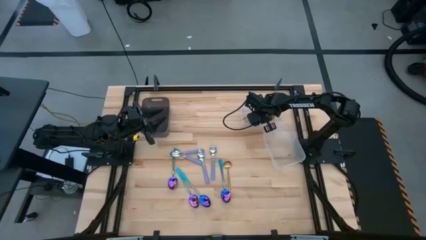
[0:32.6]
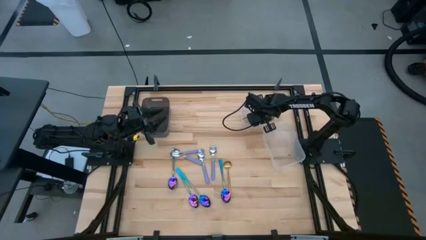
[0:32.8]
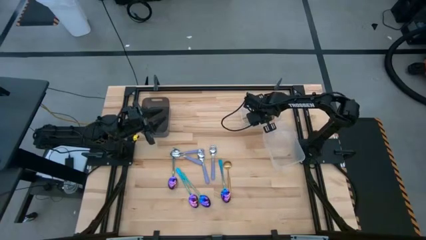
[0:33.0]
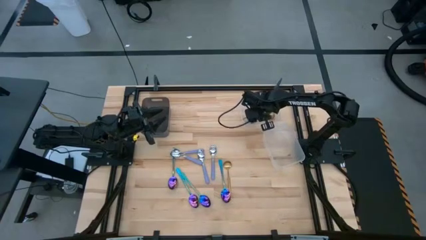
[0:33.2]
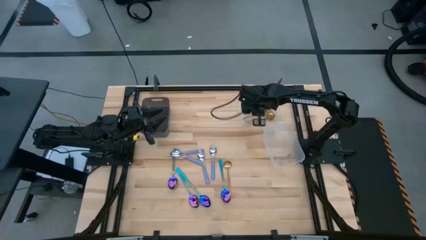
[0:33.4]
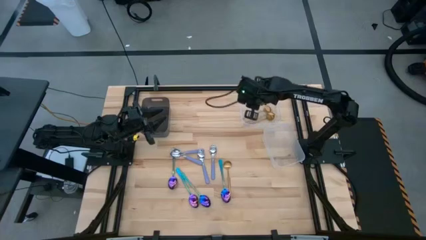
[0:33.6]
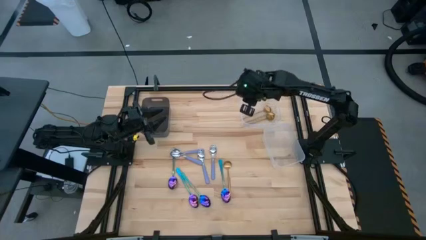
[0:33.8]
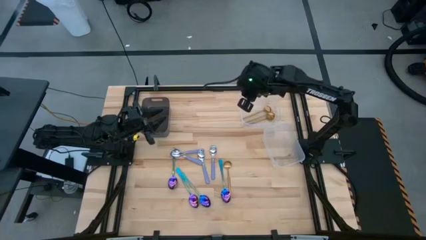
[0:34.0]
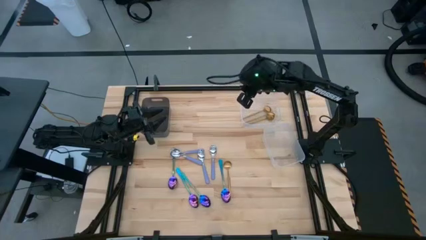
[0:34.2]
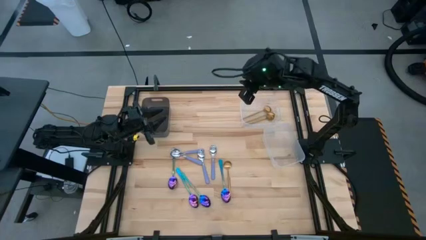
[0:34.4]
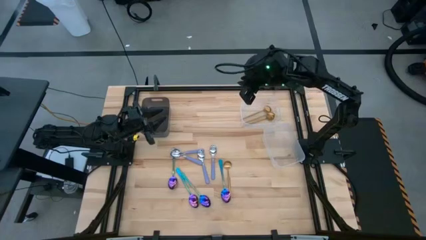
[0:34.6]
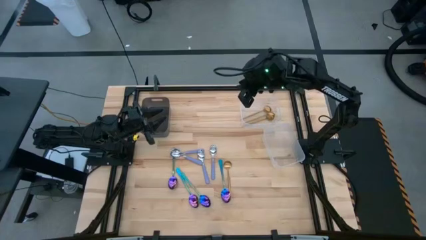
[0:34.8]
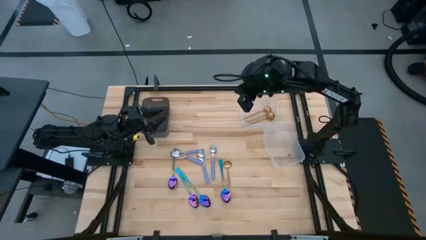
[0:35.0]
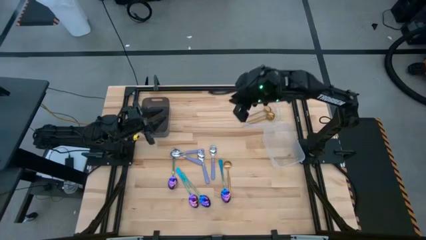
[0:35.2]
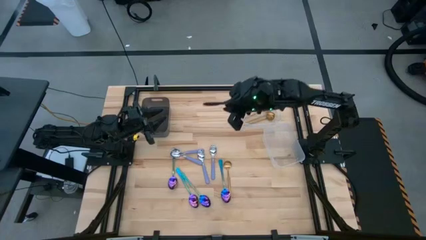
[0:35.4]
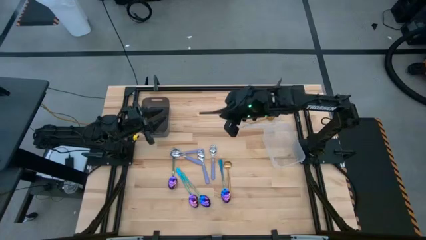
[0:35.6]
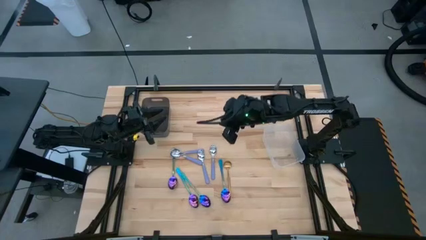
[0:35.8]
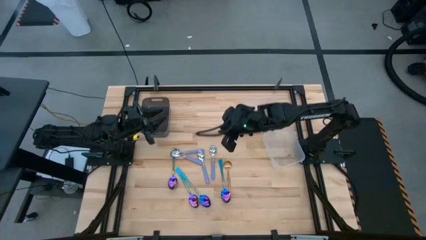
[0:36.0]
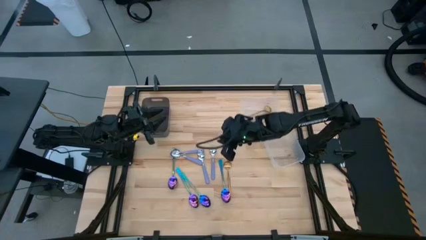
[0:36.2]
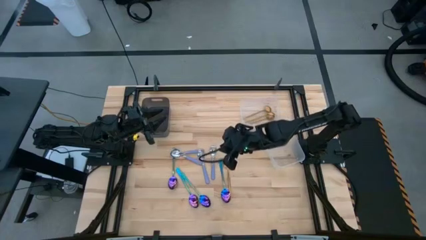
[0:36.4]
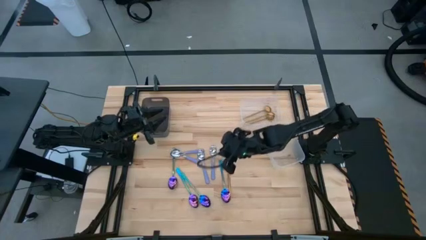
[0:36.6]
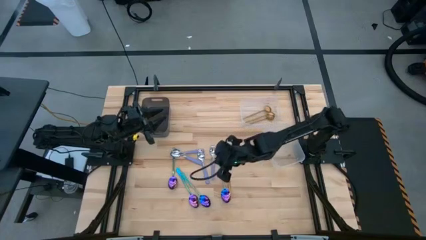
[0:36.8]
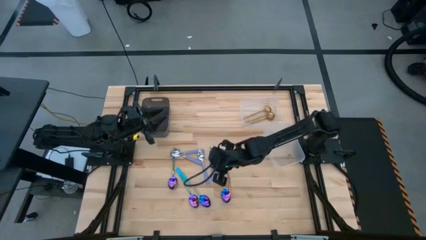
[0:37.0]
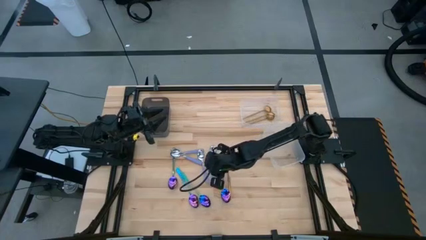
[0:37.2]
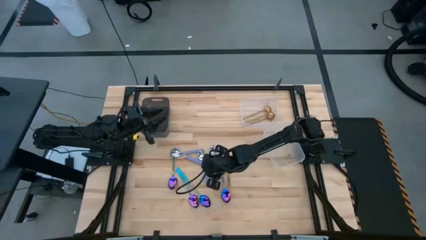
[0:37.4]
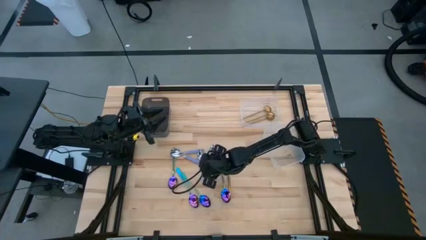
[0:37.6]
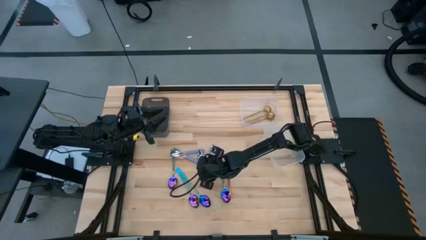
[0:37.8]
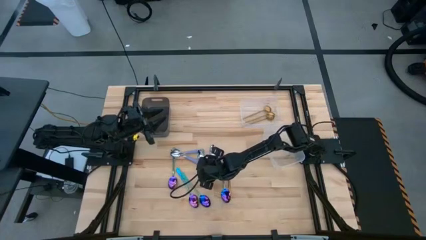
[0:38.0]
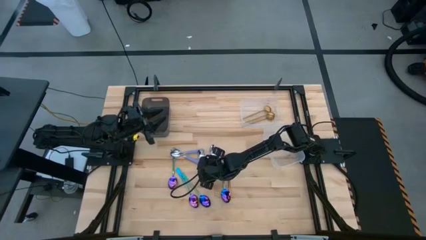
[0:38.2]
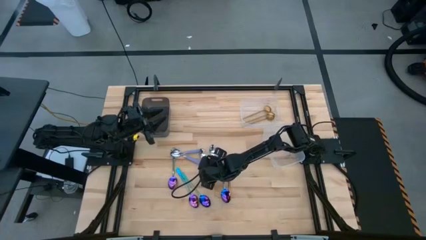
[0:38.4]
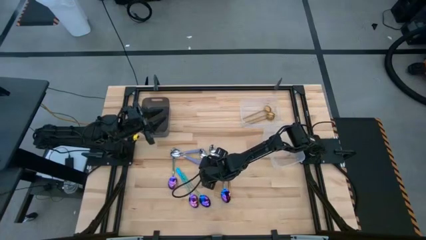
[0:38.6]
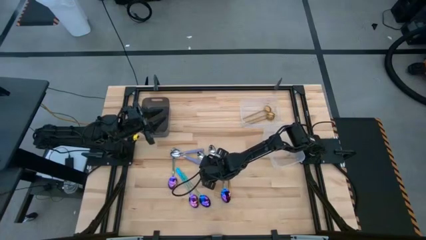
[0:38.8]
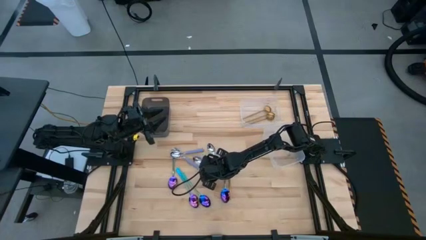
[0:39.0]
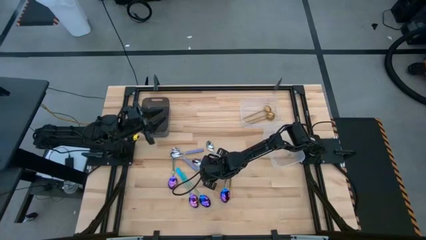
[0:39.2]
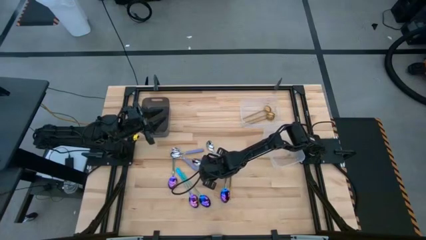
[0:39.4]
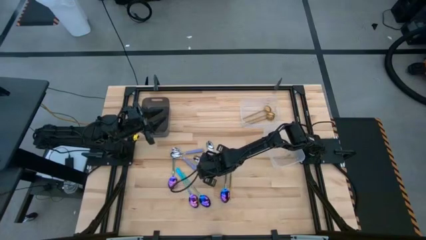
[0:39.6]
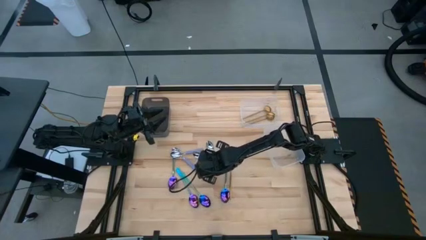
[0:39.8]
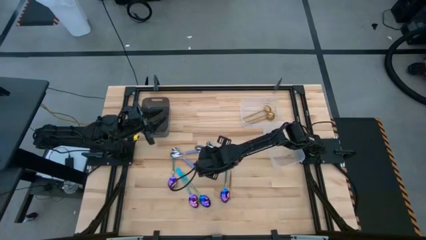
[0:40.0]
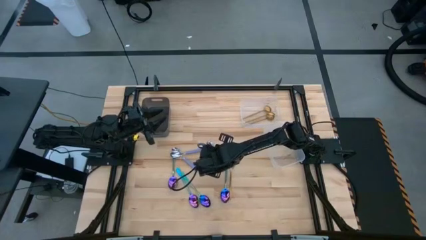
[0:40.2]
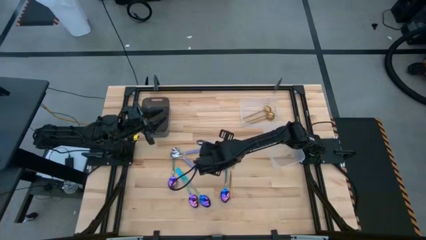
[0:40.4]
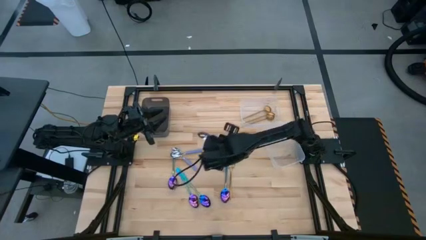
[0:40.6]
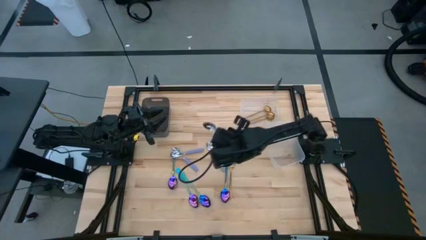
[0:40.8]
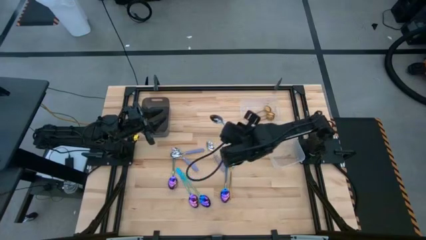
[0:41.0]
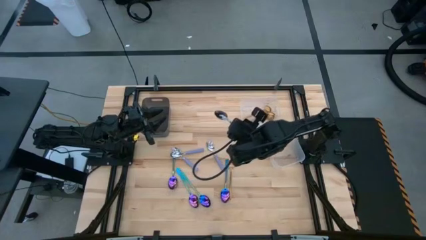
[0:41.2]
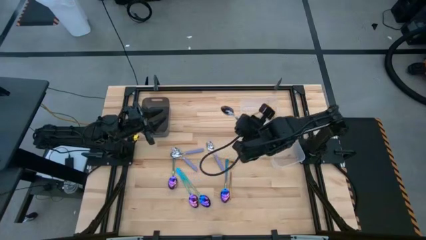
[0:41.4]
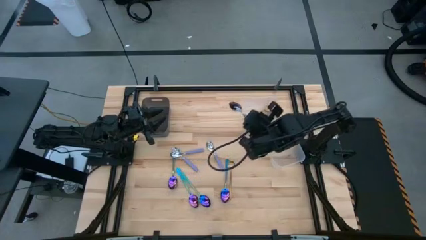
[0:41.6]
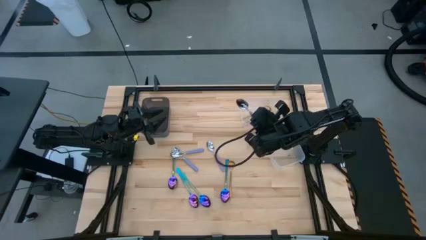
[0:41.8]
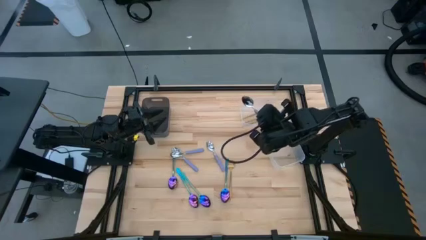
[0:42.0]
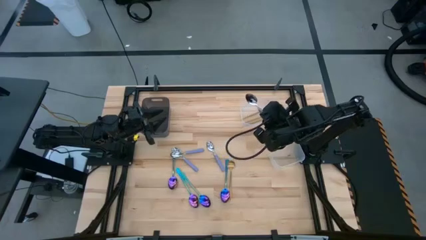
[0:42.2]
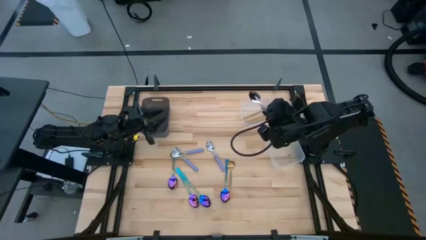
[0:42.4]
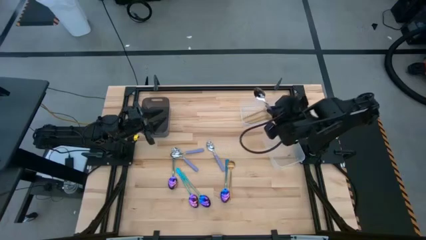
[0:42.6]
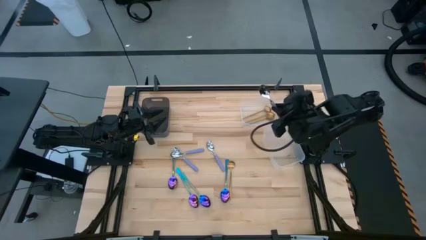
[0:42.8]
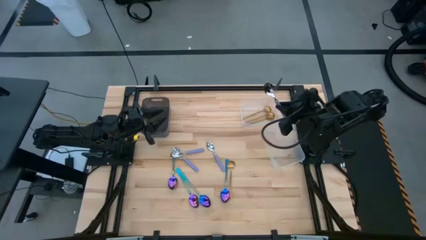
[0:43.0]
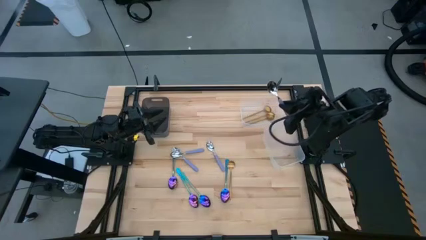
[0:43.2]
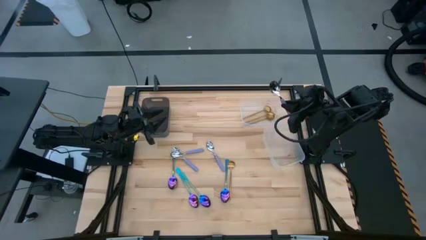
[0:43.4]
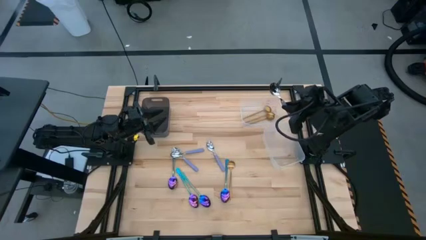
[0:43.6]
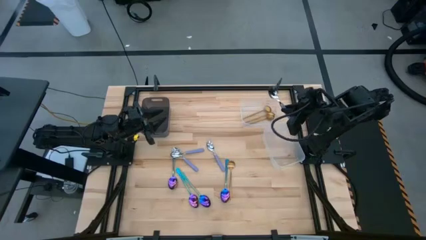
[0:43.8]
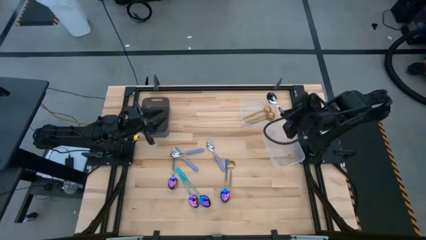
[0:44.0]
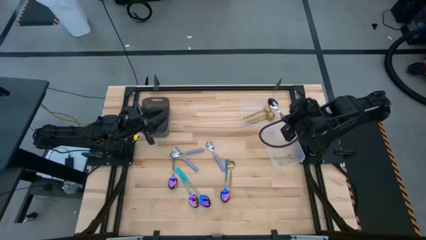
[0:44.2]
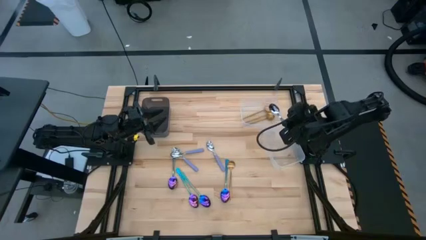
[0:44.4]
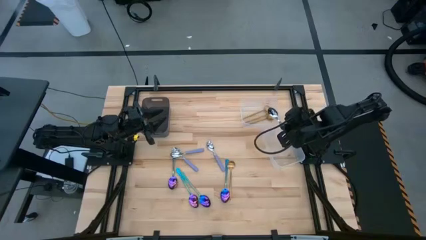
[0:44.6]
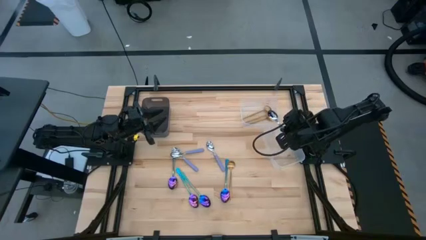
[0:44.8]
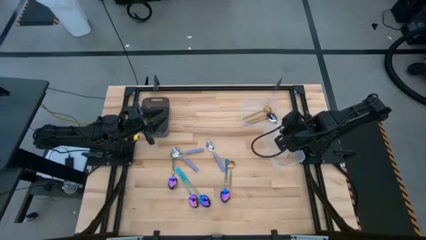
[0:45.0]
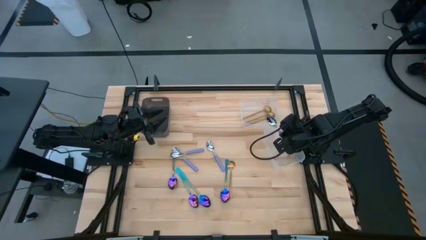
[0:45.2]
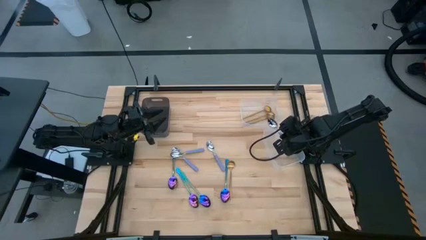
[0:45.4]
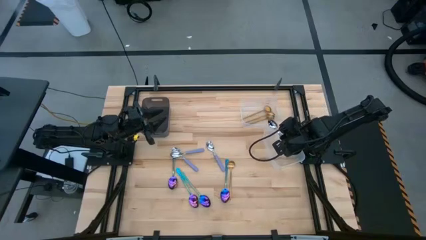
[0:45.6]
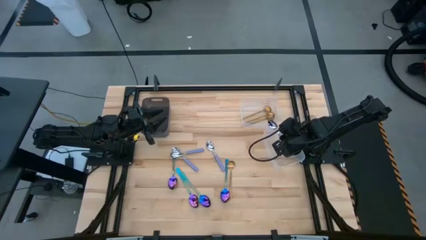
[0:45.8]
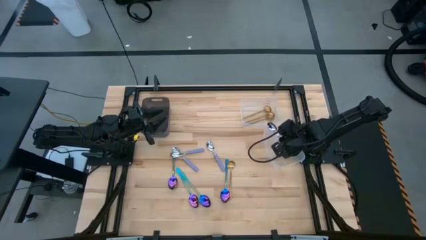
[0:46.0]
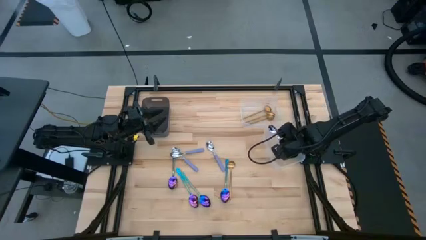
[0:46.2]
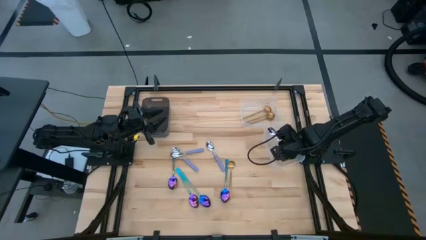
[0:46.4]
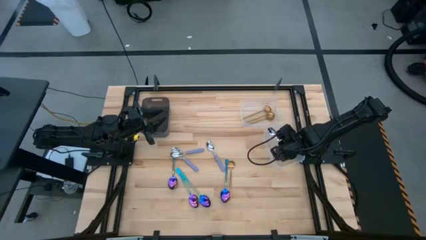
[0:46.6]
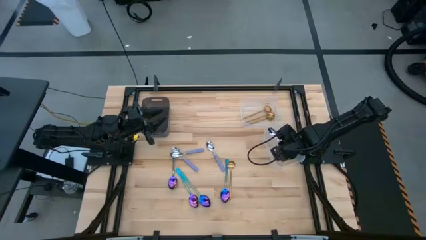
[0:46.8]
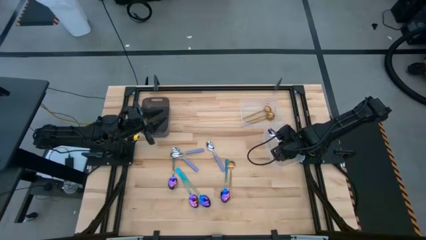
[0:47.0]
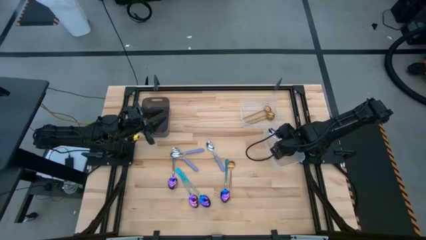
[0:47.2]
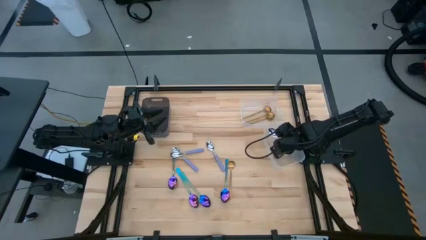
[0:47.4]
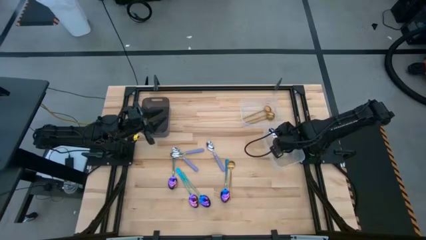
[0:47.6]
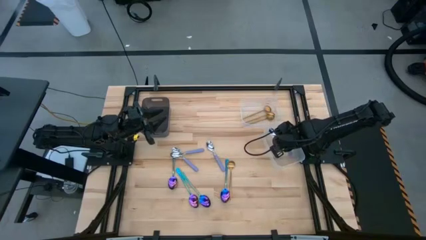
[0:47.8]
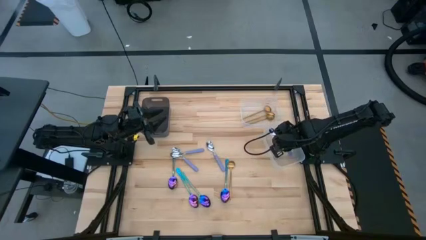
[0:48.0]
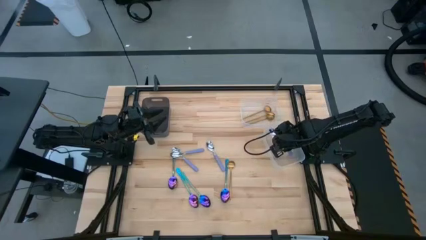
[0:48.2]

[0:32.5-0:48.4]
Task: Sort silverware by color (type)
Put the purple spoon into the bottom transparent bin

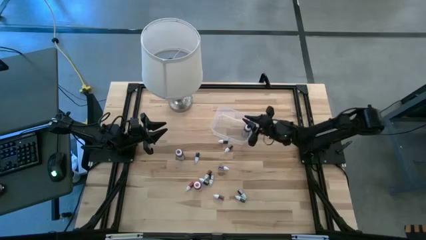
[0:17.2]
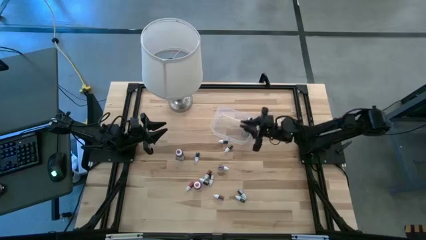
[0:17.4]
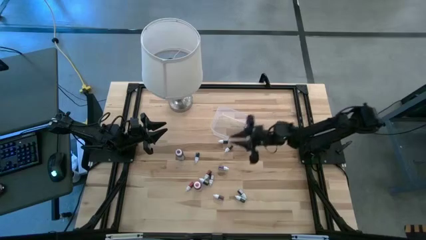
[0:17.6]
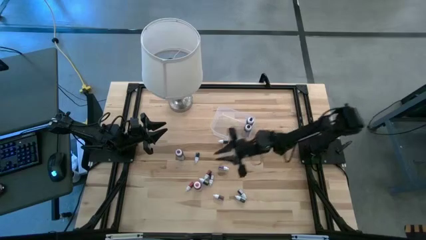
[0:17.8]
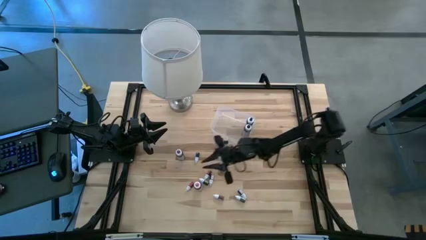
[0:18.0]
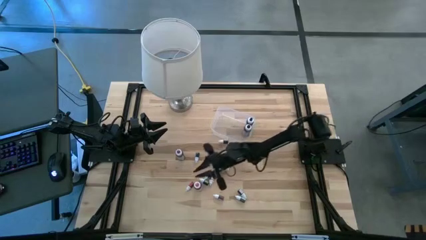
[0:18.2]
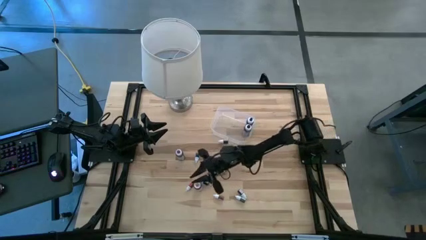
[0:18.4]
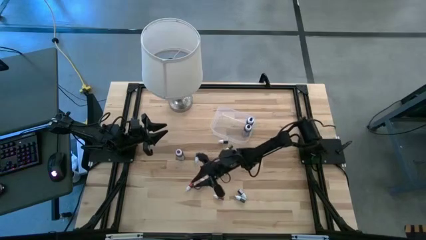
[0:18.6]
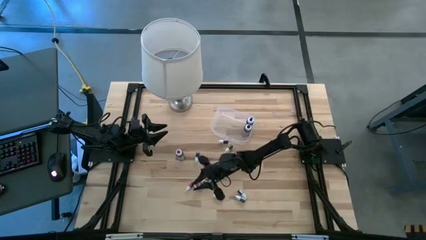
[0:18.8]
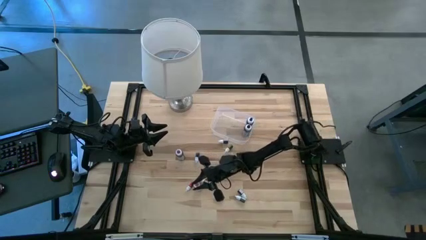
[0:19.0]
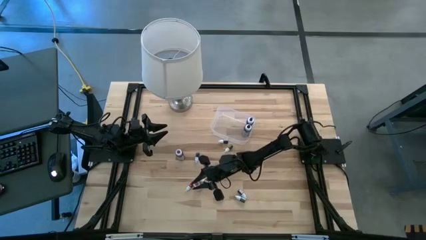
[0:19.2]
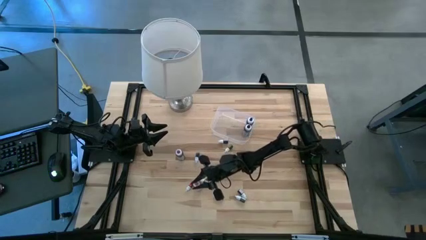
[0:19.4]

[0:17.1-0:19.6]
Task: Pick & Place food coloring
Put the large red food coloring bottle into the transparent bin
